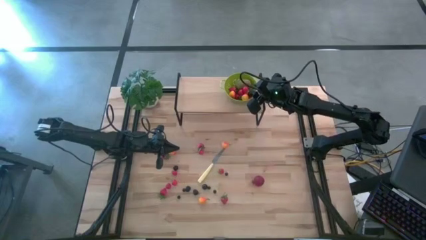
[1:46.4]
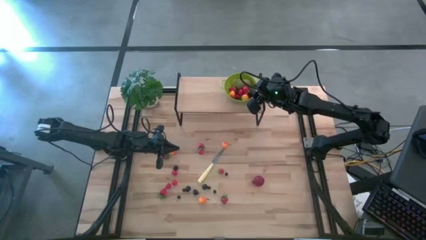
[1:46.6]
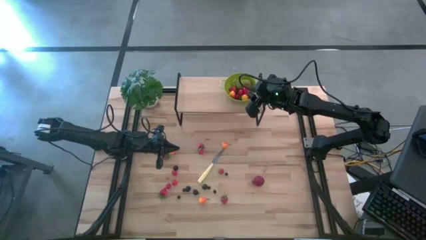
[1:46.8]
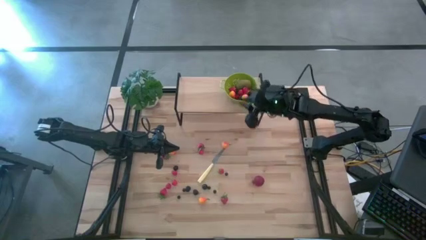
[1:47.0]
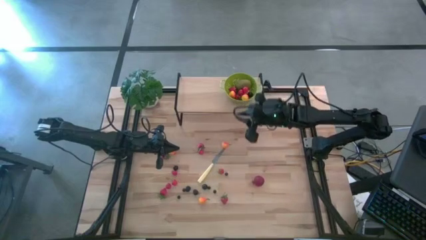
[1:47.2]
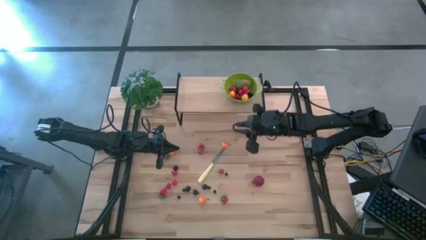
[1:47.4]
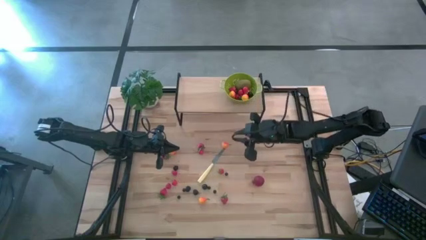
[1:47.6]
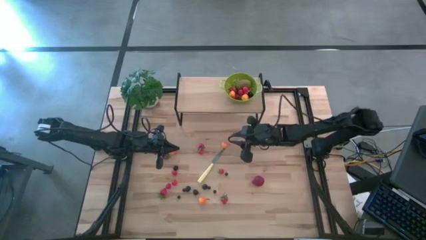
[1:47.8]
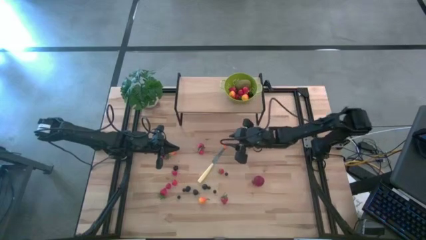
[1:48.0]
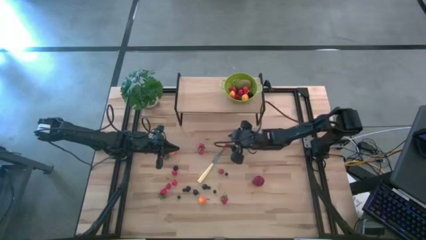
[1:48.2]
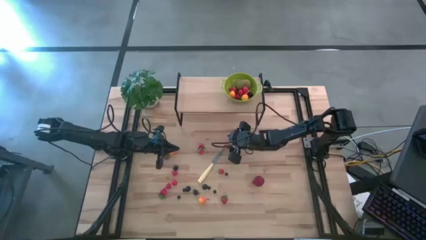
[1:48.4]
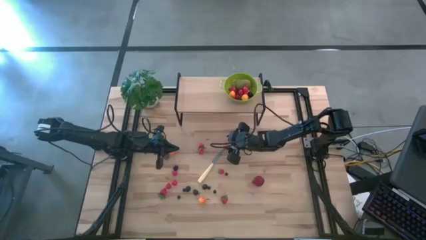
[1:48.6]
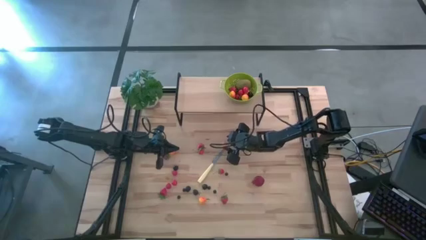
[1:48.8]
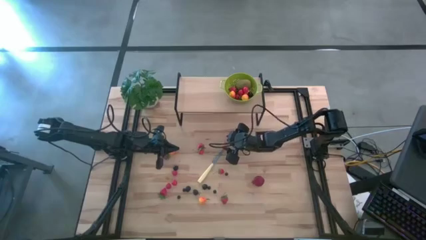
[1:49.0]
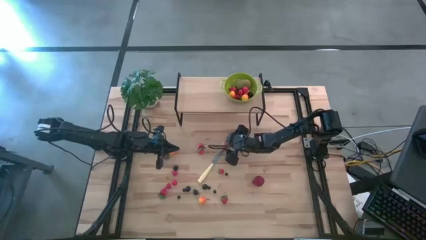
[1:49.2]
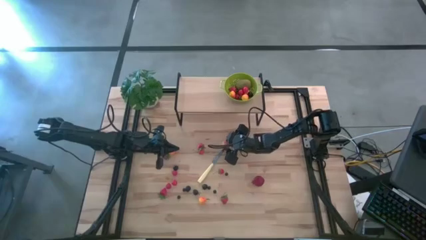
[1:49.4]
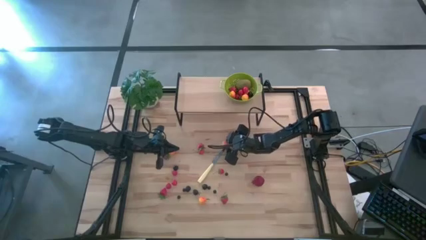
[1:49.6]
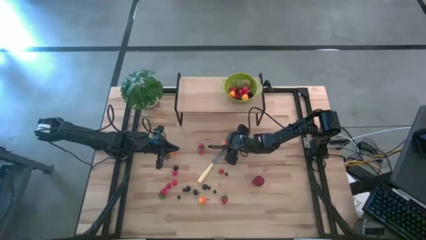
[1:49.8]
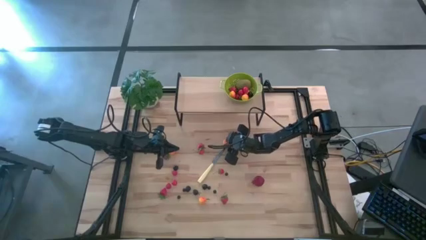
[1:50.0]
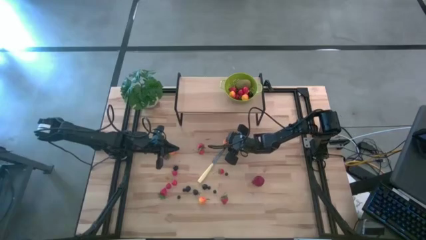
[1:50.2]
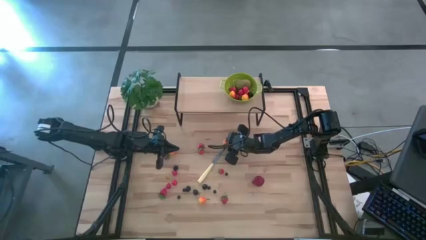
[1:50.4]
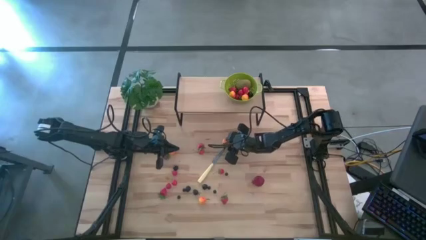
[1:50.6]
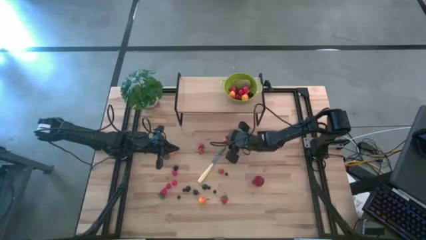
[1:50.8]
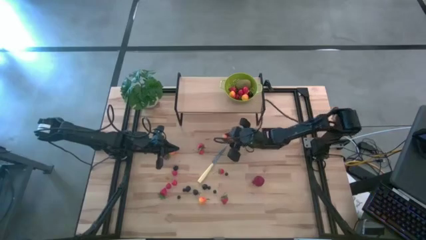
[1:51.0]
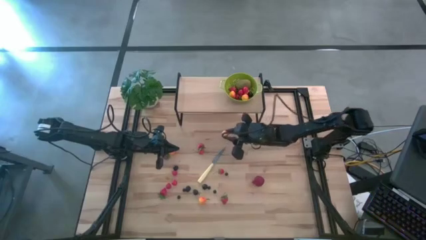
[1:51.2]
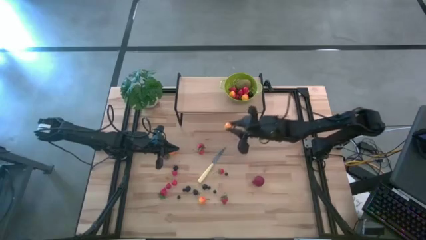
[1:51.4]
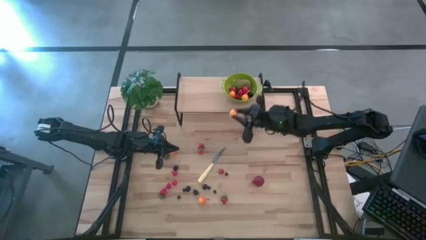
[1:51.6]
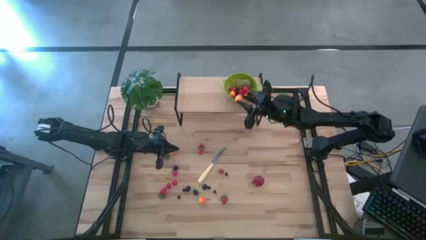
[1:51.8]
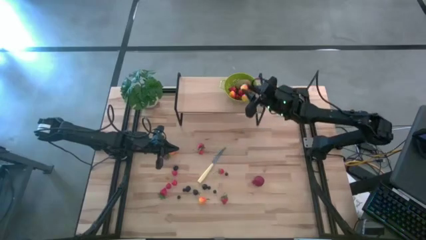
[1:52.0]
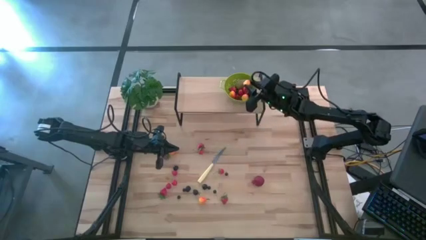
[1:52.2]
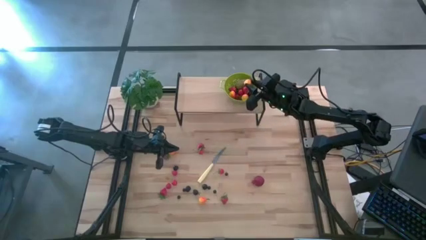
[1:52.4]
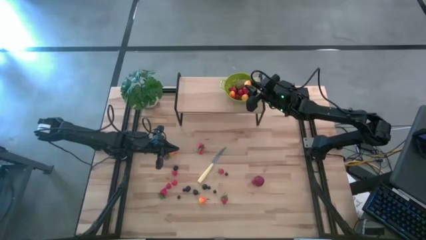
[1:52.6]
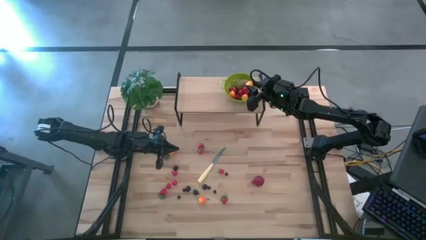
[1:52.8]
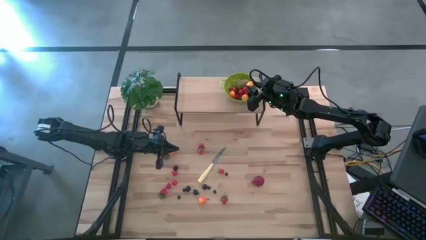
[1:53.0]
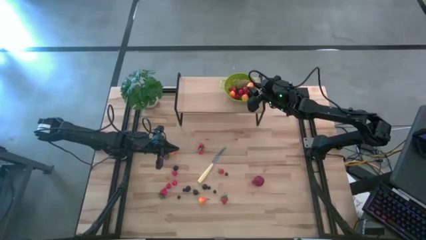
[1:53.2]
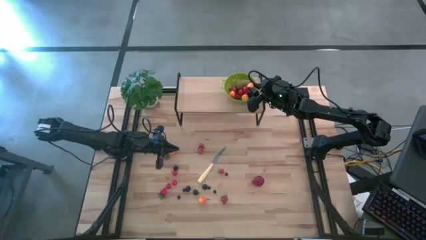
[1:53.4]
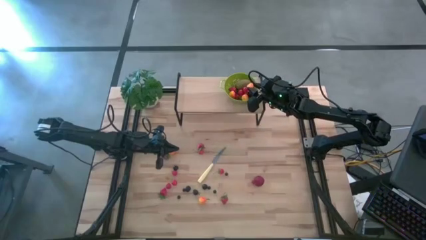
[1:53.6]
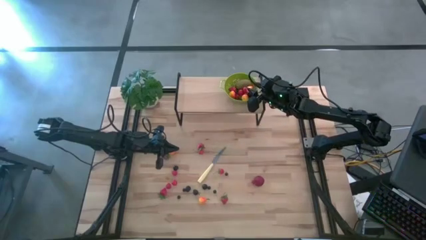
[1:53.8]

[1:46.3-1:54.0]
Task: Pick & Place Fruit
Put the pear into the green strainer bowl

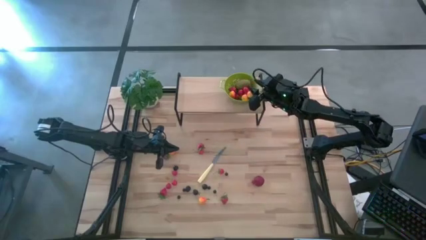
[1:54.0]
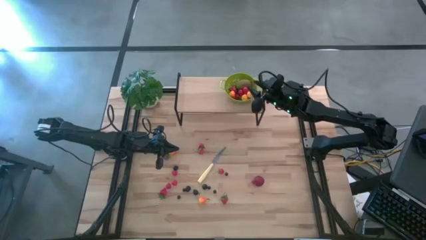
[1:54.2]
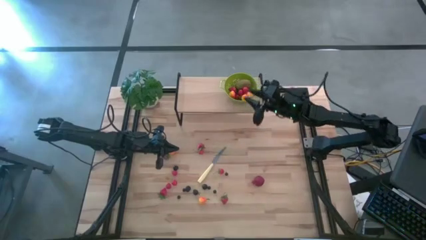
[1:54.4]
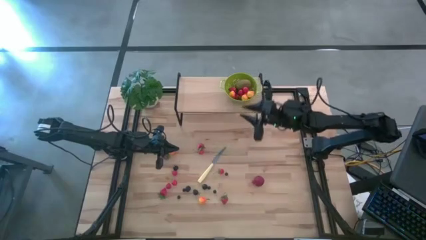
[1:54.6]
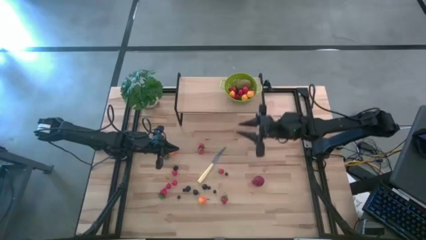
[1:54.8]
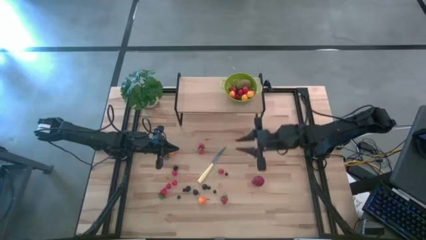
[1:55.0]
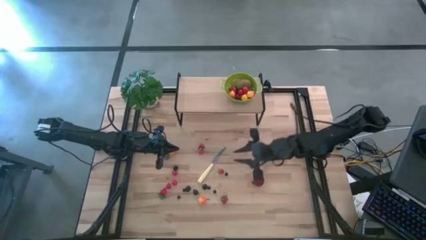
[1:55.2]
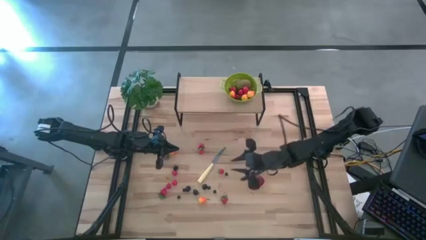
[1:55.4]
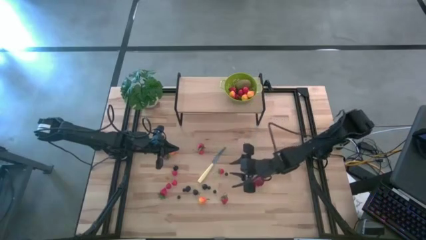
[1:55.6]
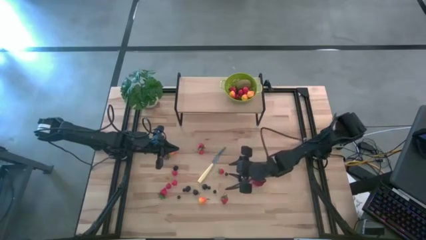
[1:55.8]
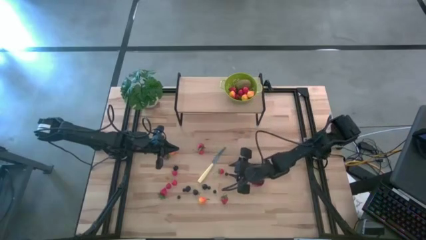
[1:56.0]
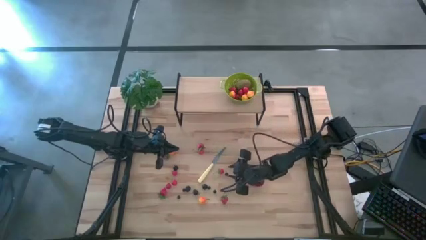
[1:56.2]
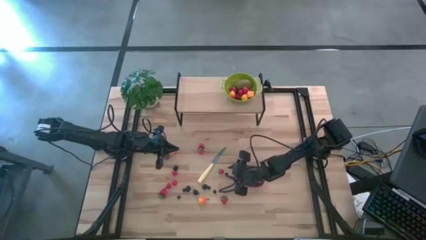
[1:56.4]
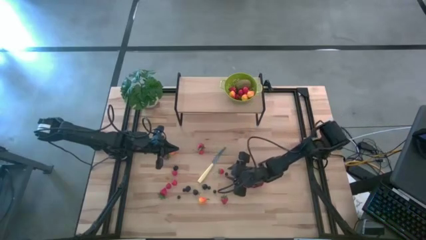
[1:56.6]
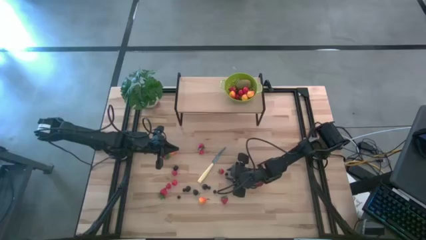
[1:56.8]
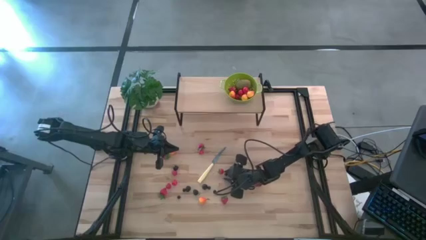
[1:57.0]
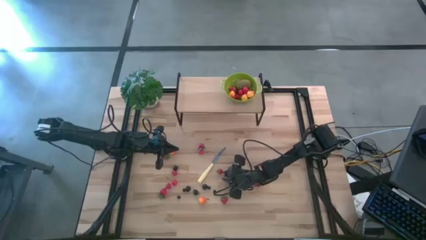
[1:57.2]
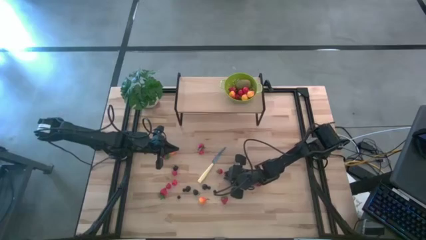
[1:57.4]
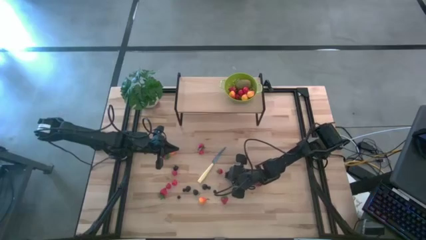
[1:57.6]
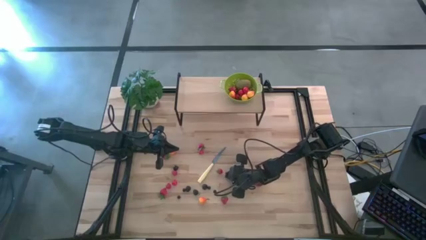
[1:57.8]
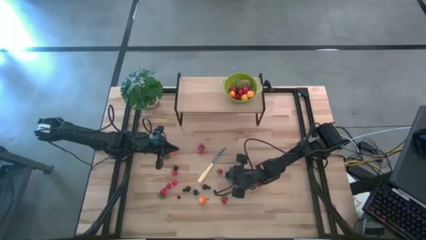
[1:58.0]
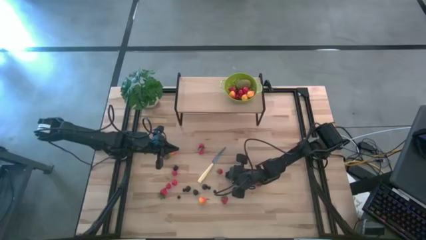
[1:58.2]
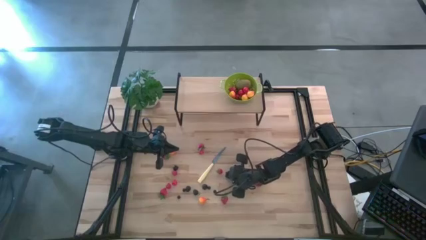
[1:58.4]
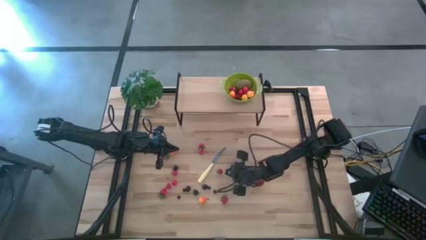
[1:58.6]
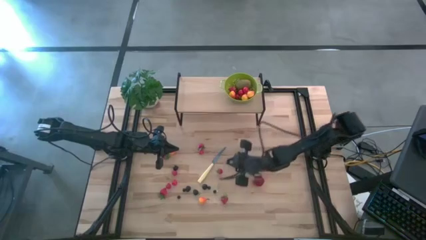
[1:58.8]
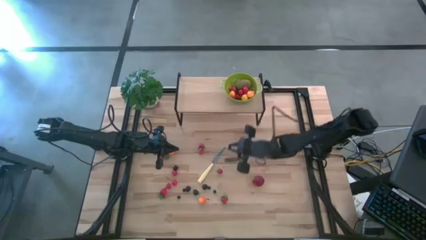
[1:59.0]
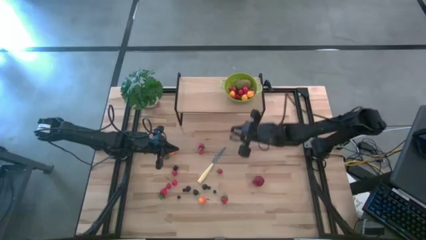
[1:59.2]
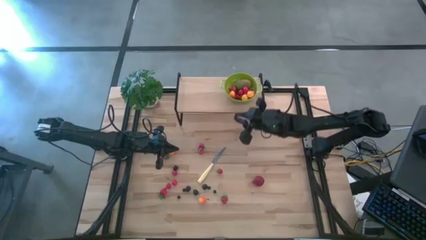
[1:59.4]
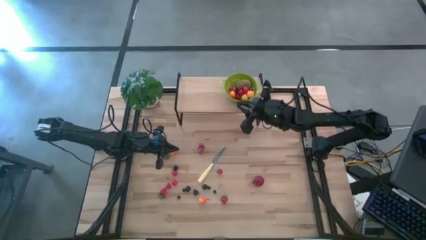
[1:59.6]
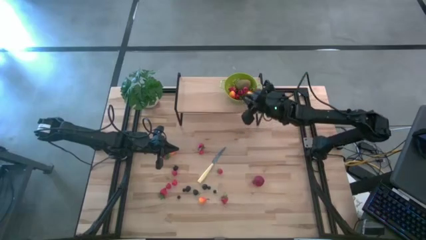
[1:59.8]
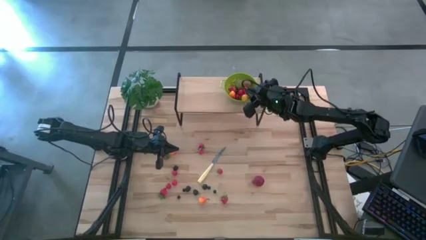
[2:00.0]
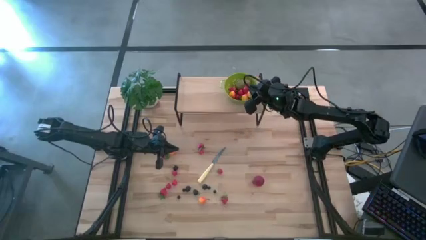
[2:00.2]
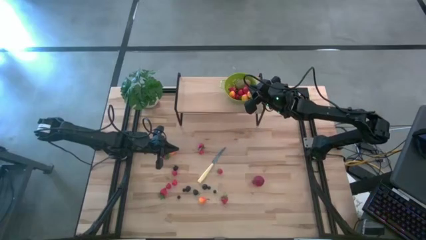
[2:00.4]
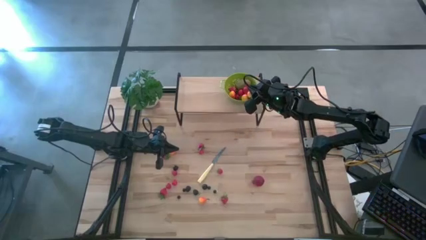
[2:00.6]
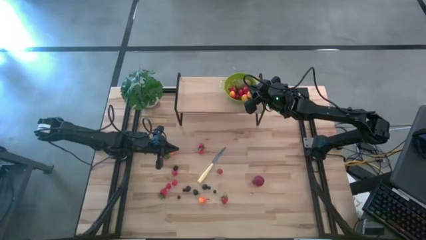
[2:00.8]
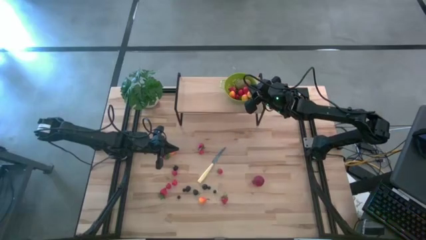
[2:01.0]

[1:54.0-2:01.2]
Put the blueberry into the strainer bowl

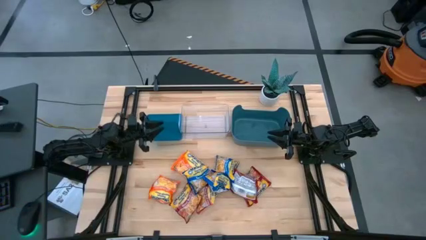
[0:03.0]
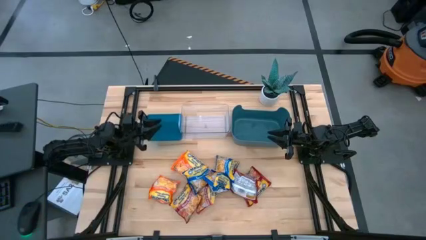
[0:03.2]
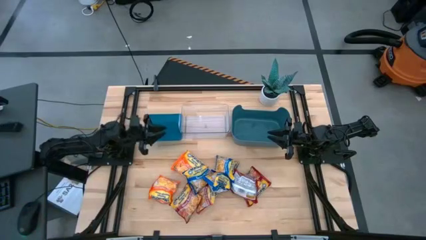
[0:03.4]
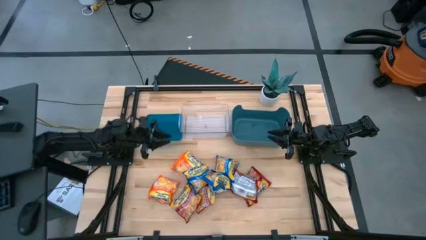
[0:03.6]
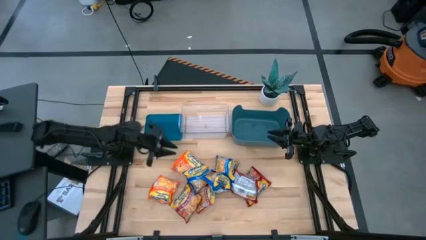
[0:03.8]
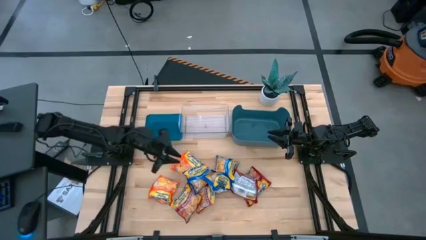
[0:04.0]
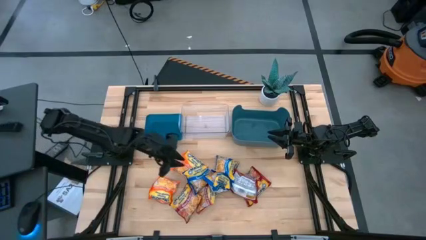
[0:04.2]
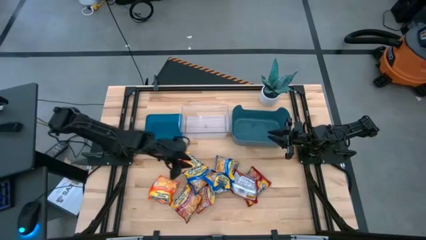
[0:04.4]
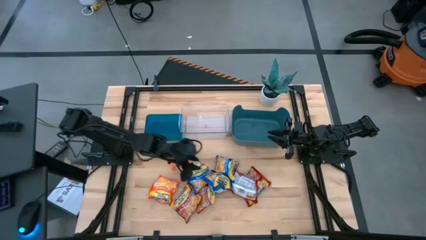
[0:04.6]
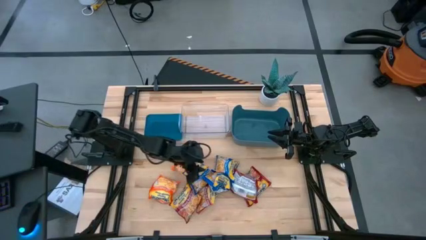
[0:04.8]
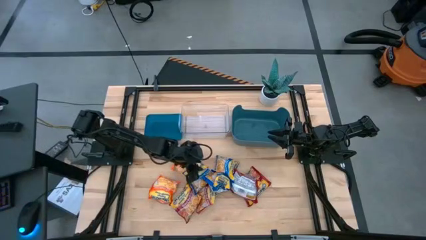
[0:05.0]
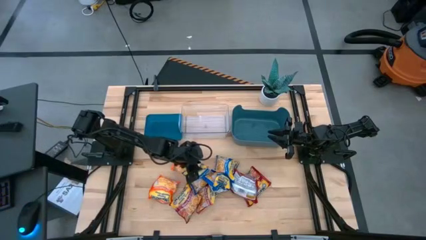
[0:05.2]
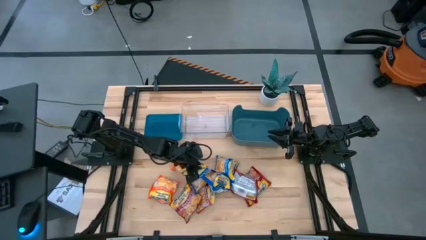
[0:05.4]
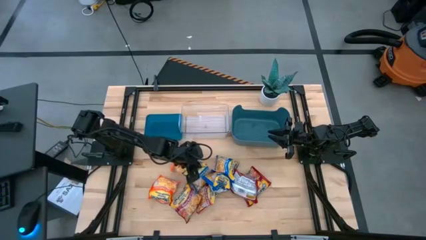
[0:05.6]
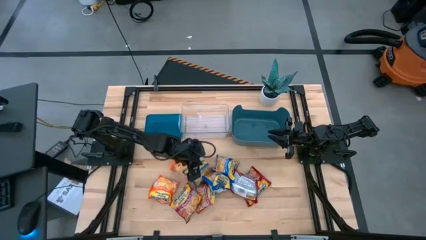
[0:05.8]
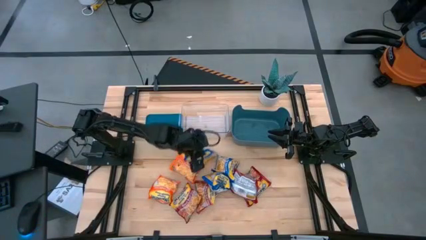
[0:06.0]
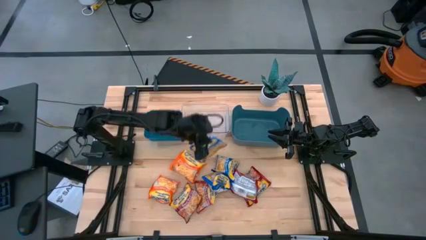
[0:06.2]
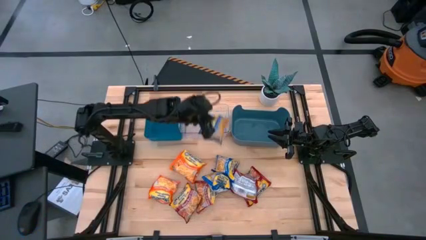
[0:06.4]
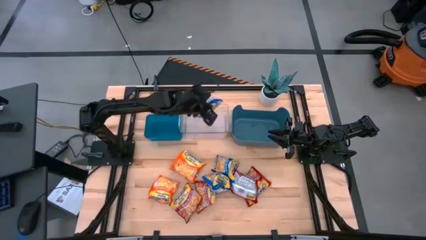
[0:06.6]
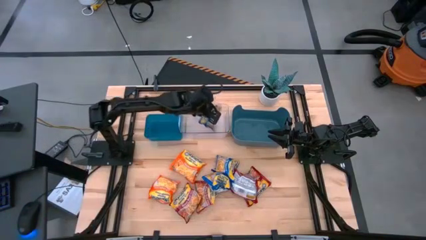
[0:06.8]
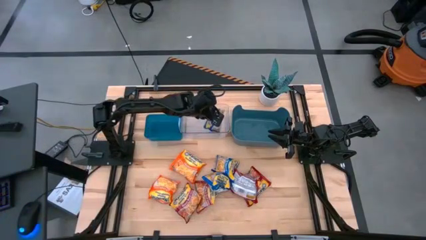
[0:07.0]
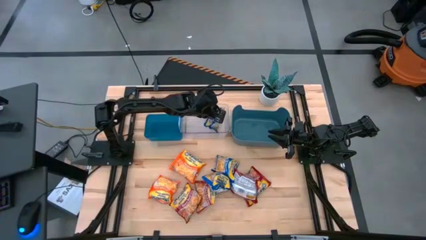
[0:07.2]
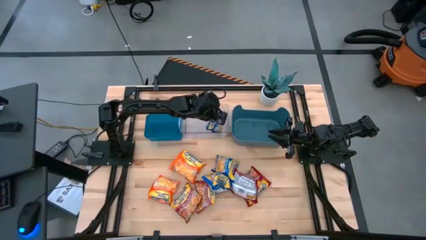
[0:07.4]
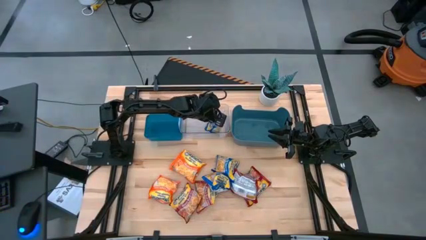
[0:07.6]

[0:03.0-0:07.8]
Task: Sort Maruchan noodles
Put the left blue noodle pack into the transparent bin
